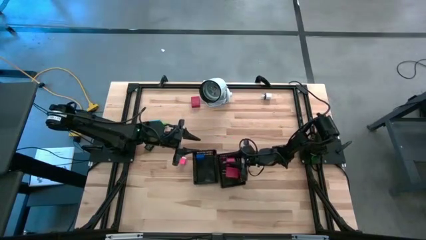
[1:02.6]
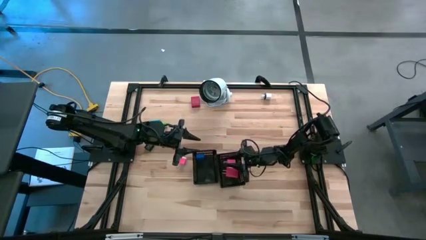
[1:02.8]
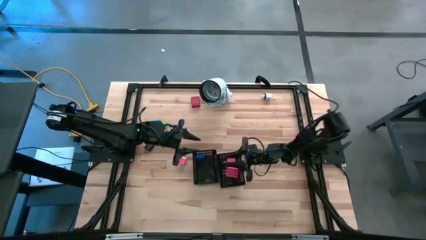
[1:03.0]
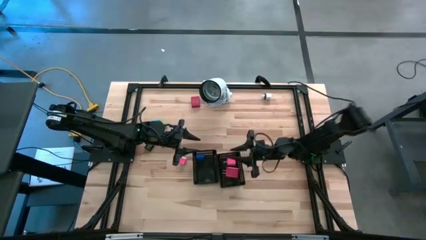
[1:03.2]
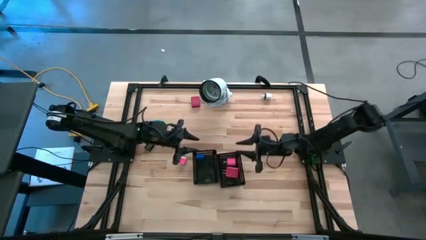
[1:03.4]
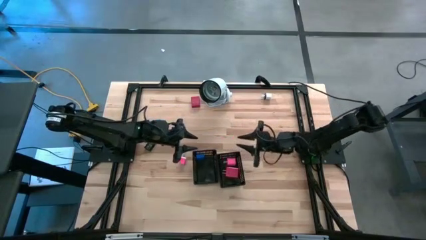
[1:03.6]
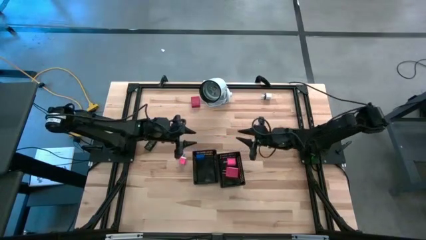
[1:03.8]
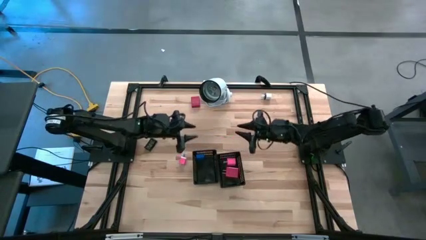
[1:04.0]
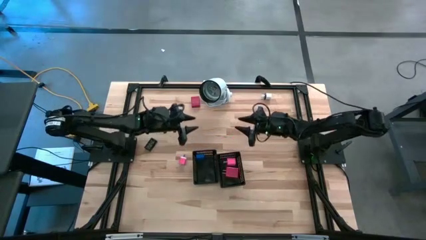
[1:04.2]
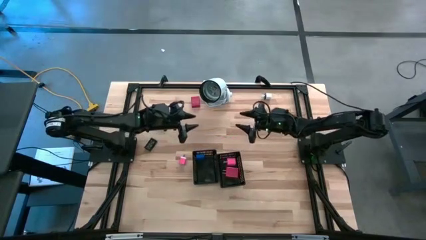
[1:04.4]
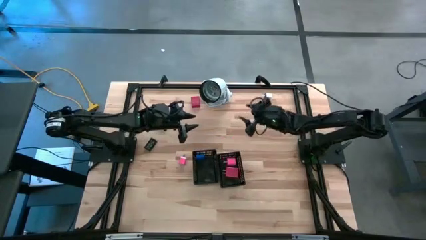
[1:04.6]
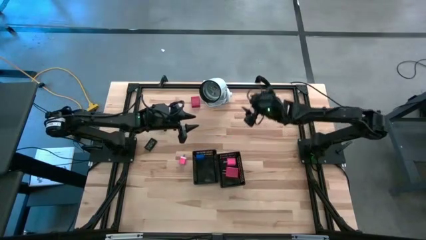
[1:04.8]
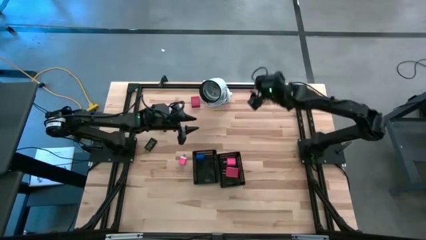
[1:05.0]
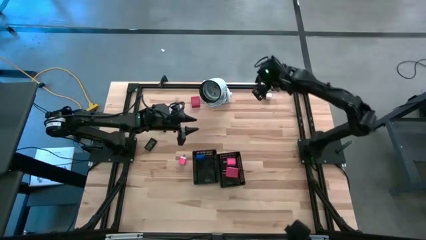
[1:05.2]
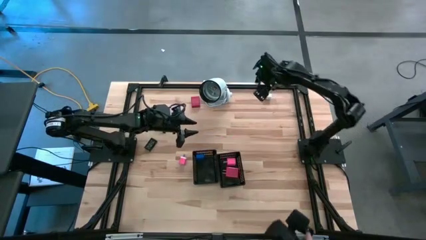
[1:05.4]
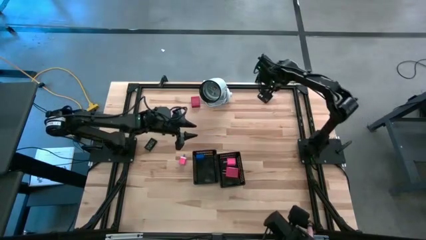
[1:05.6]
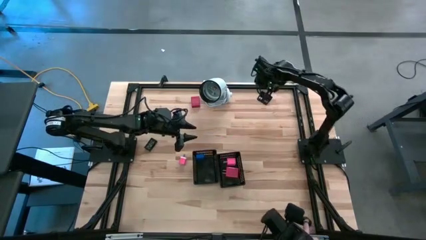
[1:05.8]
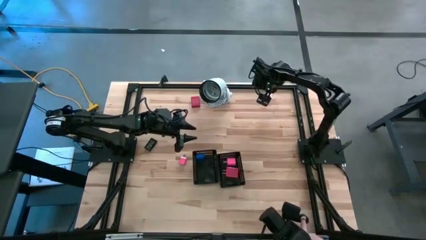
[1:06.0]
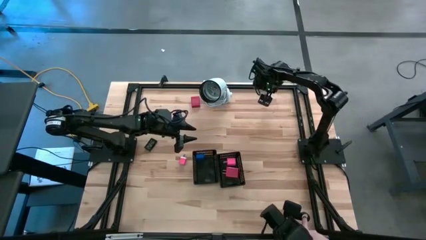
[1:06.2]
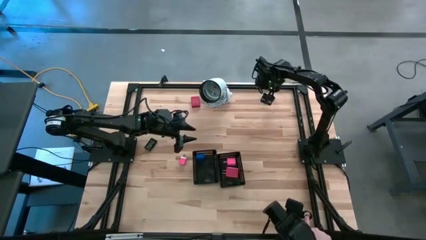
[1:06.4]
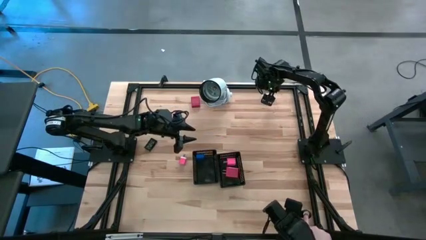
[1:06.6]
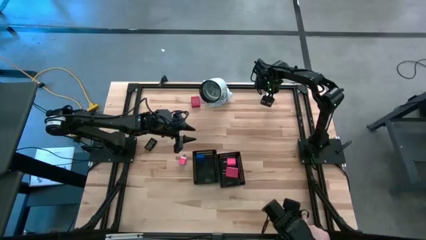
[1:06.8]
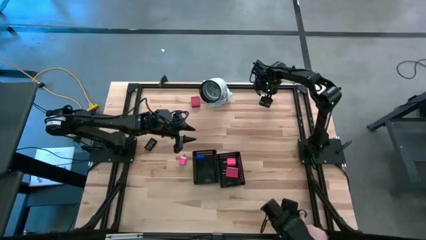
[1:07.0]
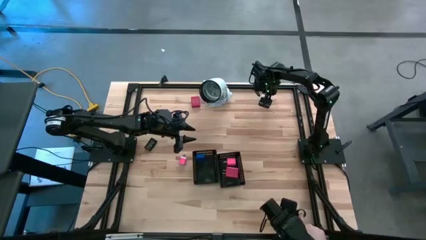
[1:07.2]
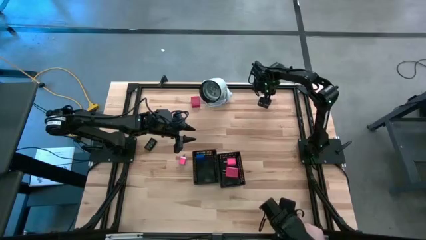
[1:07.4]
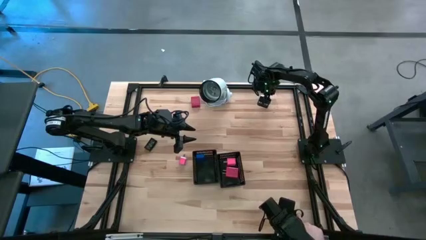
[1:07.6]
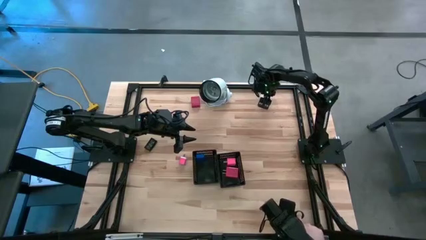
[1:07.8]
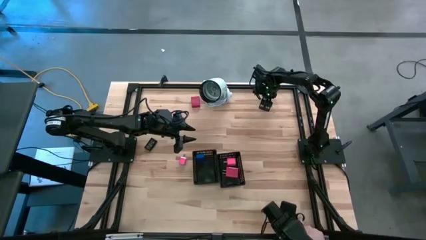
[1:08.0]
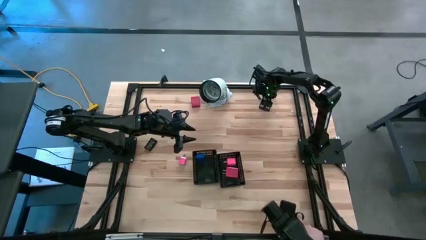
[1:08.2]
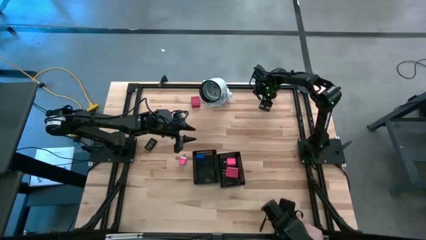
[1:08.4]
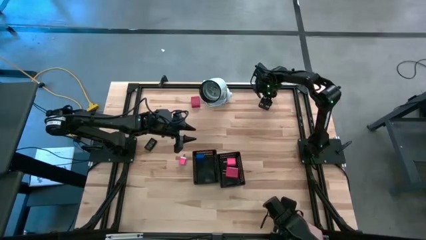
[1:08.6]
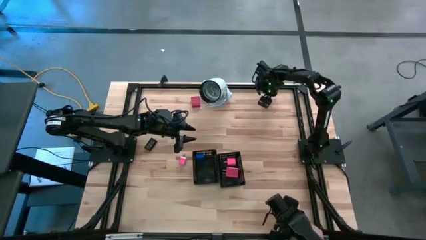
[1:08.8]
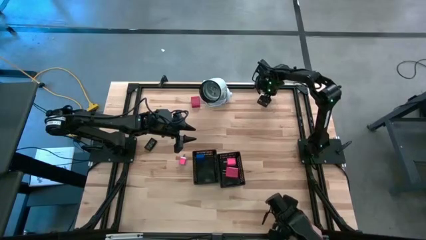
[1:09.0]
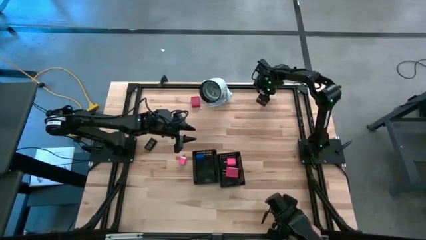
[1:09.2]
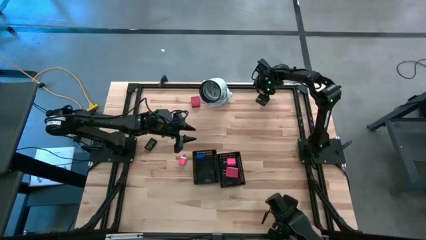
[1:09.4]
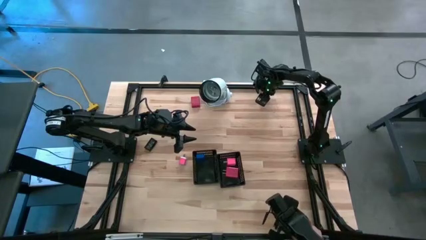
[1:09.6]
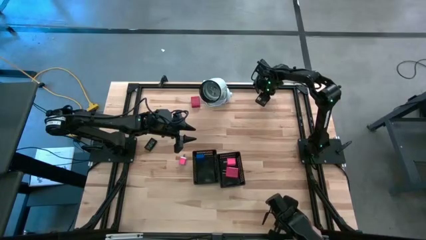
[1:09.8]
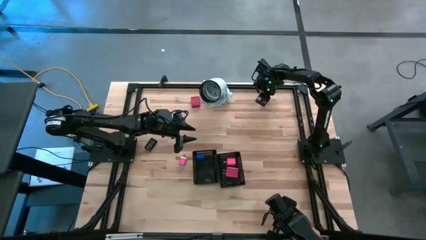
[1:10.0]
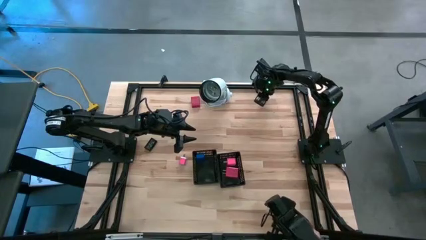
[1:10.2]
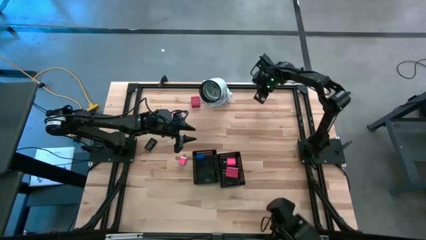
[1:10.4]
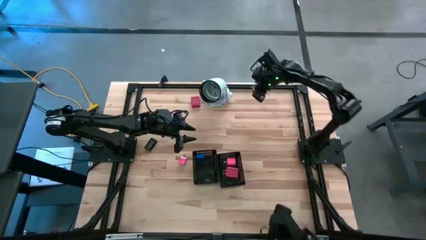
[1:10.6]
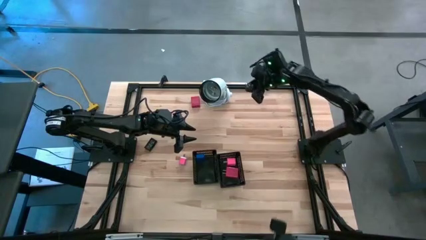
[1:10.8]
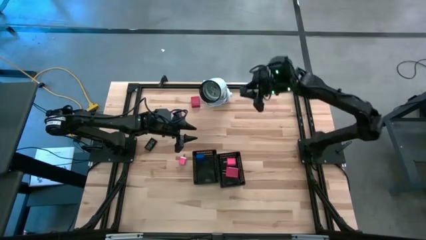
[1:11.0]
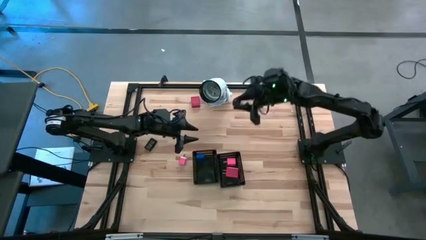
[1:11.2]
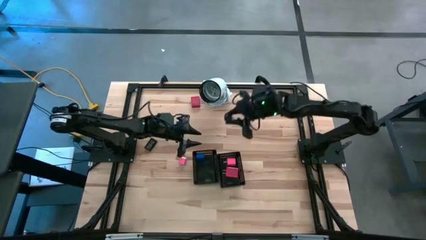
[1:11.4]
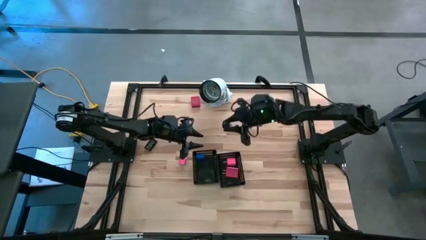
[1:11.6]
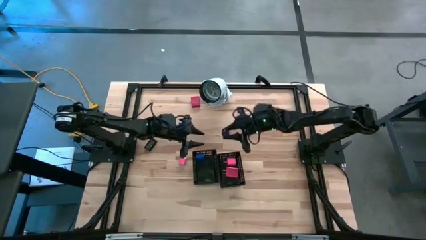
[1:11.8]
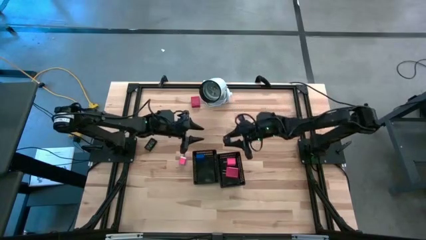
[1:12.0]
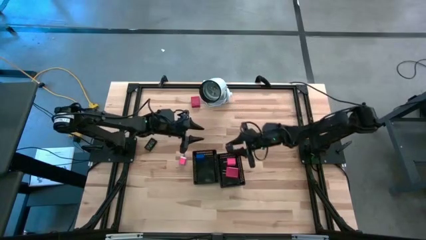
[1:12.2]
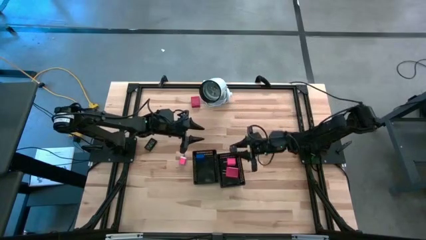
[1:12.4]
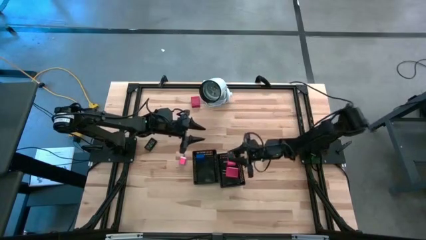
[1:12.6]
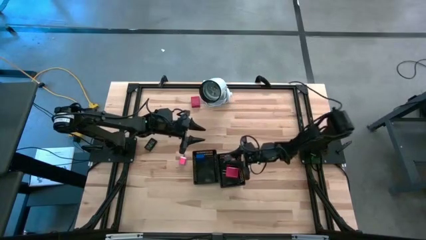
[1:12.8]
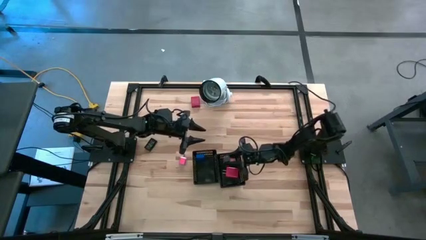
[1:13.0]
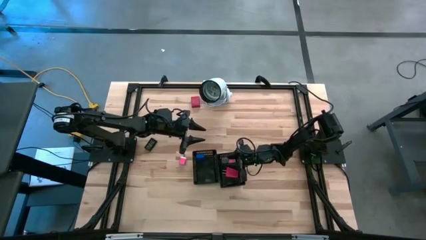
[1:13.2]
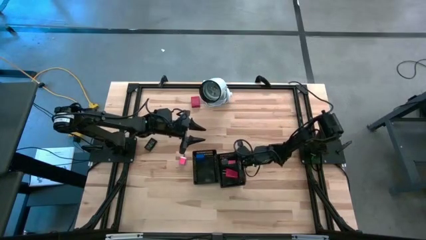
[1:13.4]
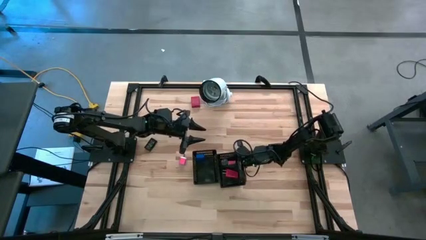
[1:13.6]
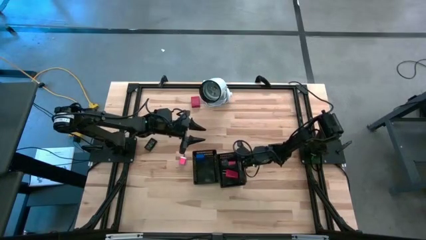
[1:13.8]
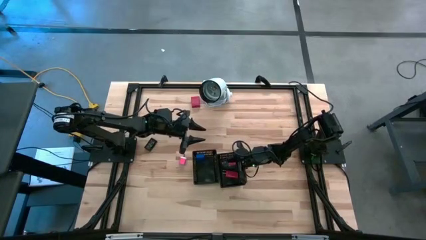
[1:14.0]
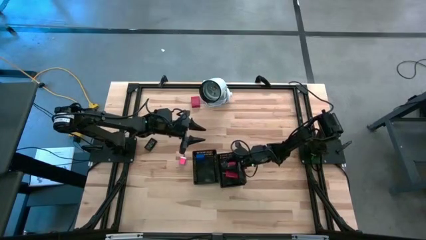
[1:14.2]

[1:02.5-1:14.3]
Task: Pick & Place Office items
Put the white charger adapter into the right black bin

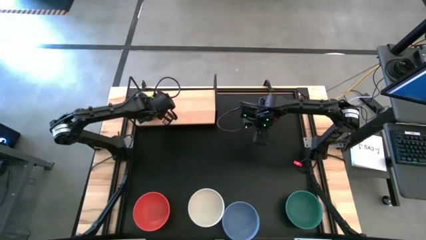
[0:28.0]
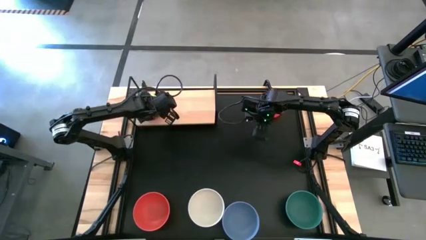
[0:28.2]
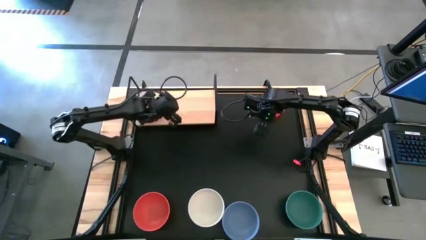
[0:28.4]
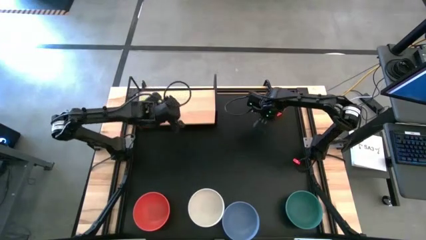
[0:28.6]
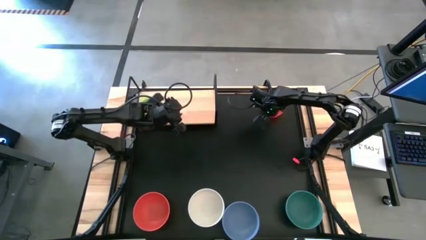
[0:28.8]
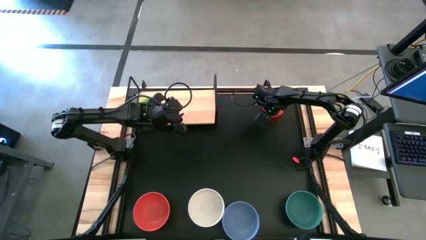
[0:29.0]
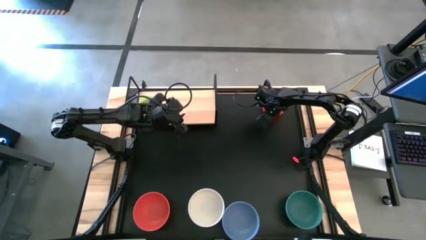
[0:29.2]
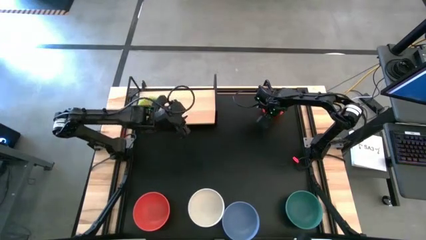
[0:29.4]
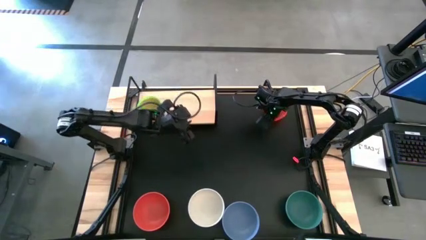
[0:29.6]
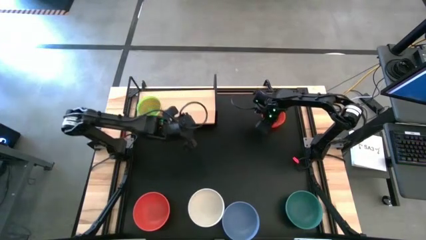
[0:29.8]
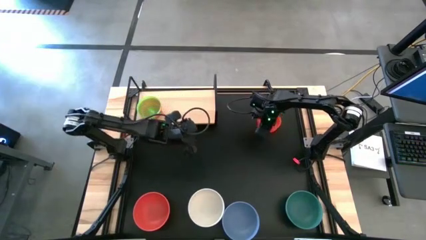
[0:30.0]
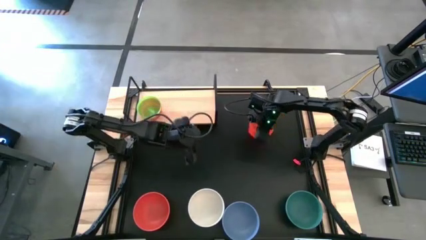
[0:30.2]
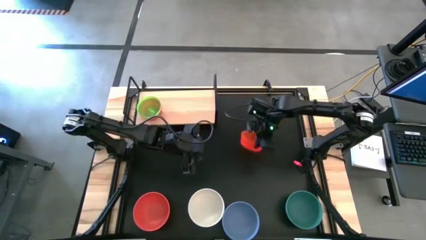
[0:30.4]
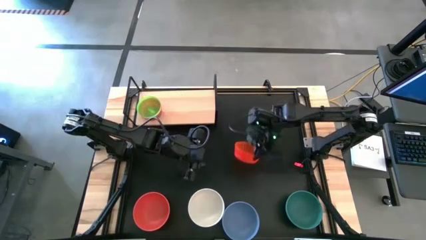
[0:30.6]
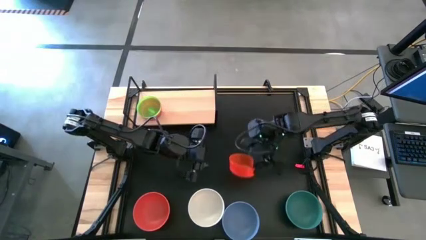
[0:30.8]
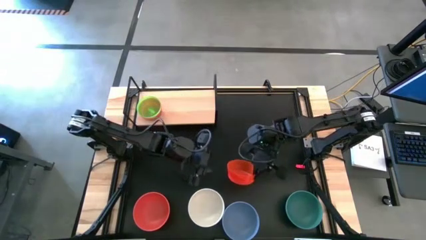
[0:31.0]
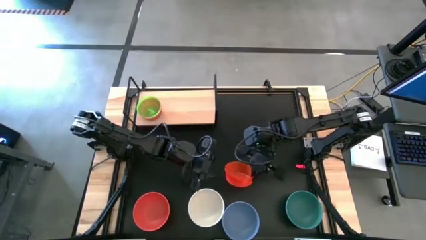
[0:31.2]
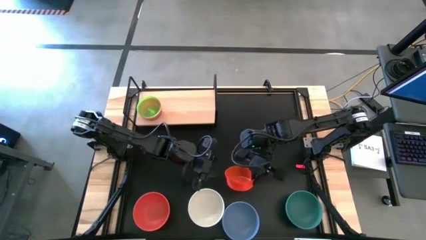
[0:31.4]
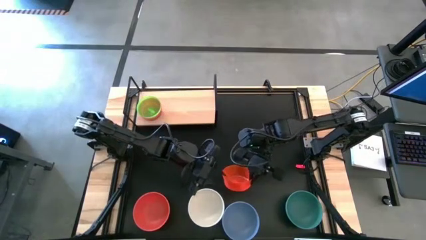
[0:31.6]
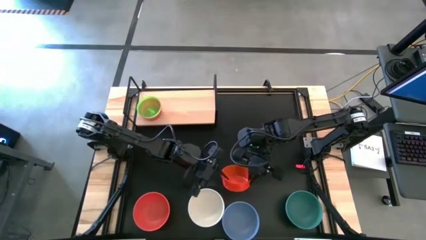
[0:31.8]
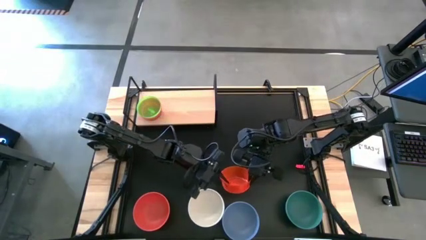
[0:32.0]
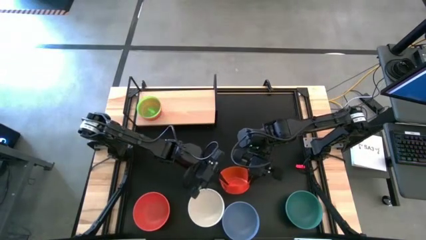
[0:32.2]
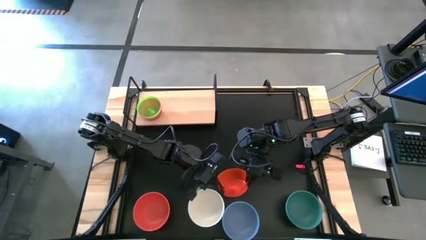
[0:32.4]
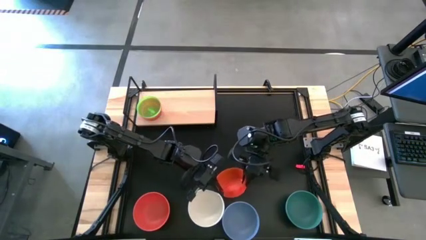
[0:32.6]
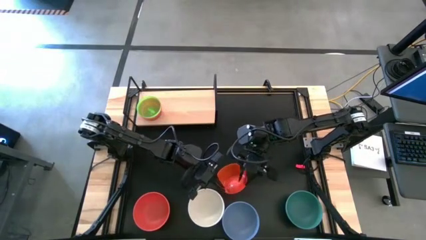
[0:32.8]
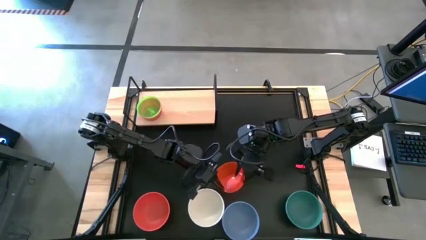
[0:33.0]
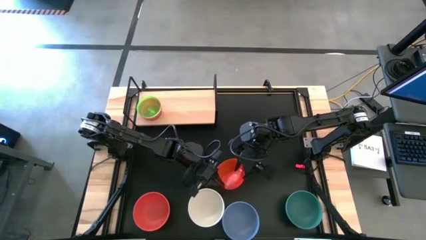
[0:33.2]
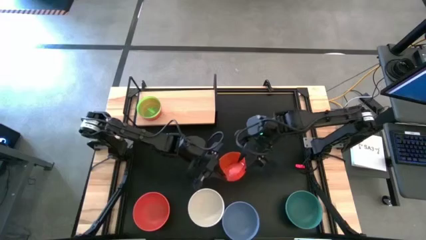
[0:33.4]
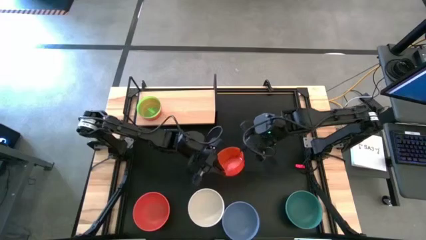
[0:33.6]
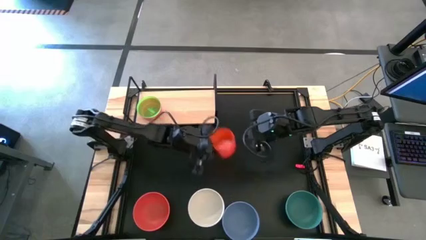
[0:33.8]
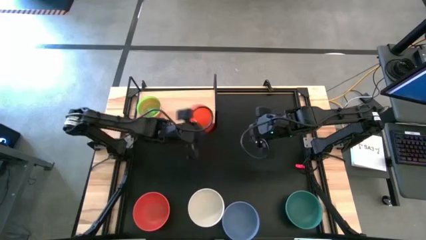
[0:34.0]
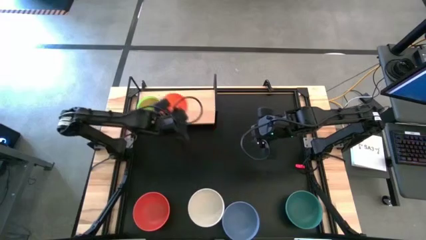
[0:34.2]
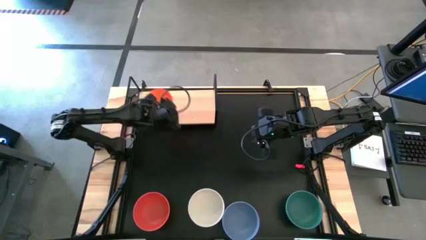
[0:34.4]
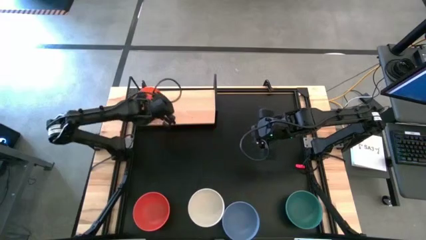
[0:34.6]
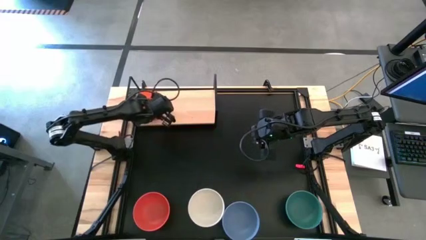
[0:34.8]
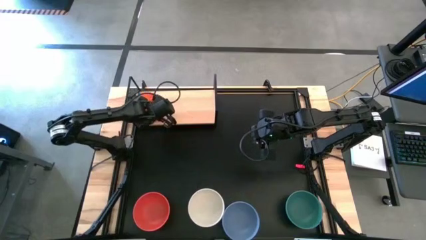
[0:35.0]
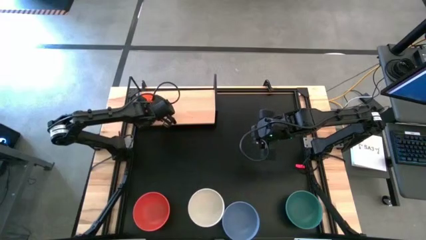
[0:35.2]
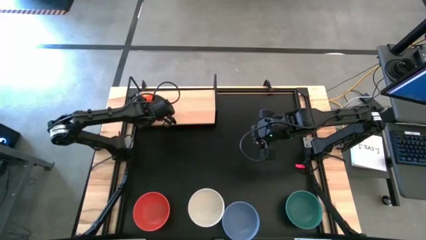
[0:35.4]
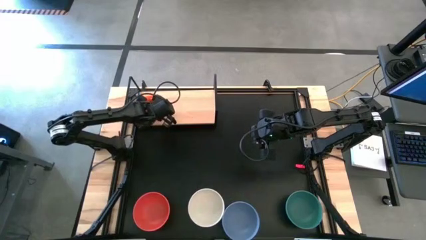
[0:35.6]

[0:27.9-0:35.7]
Task: Place and stack bowls onto a shelf
Stack the light orange bowl on top of the green bowl on the shelf
